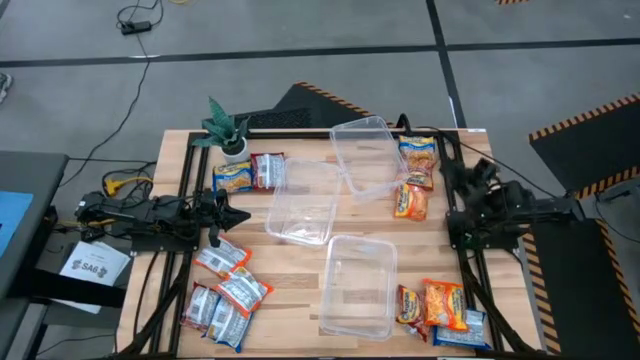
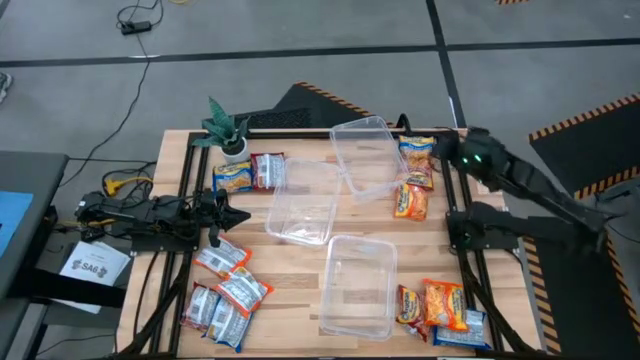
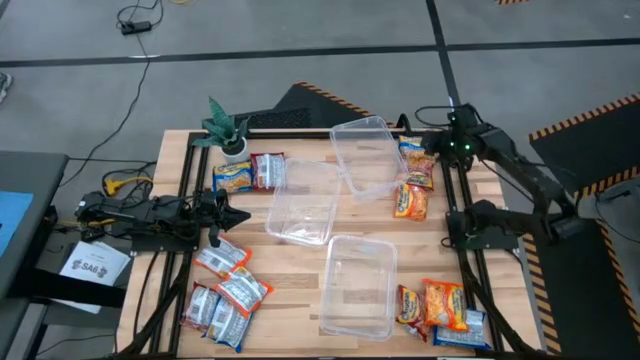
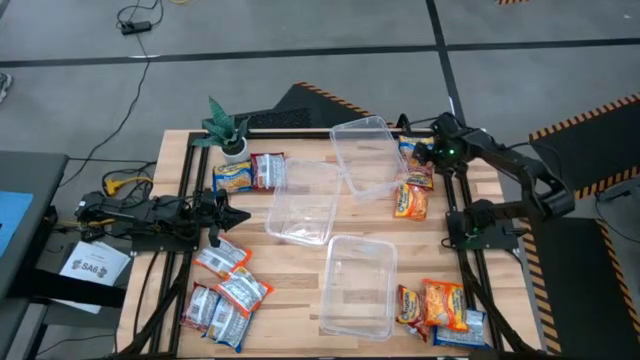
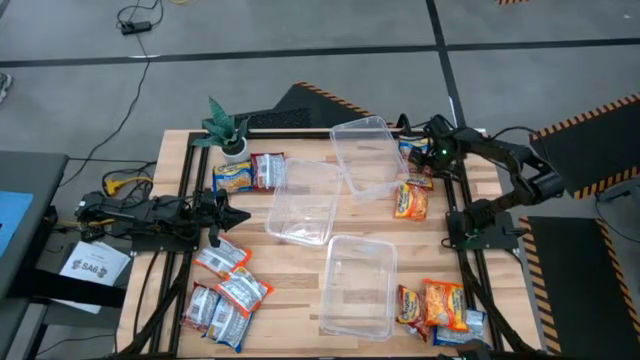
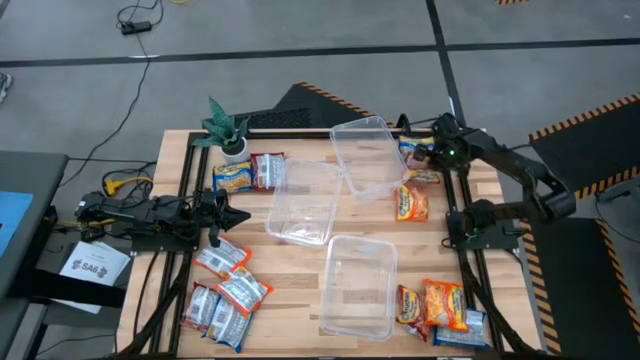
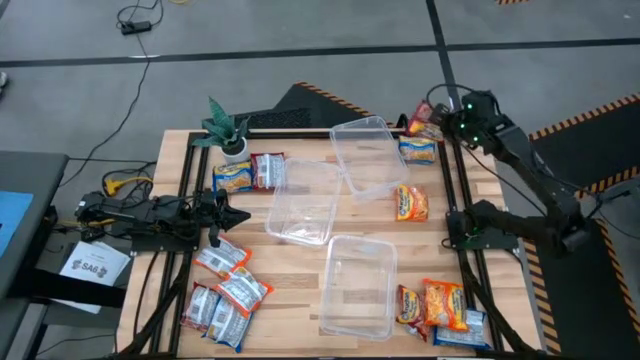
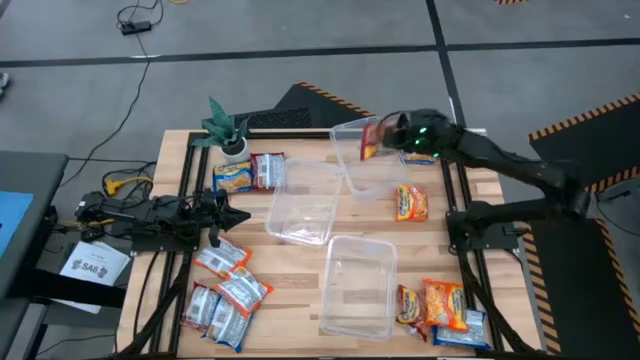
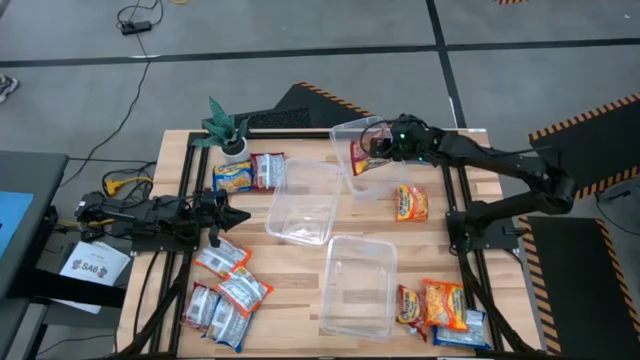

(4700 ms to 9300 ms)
Task: Sort Maruchan noodles
Put the red noodle pack into the top transparent bin

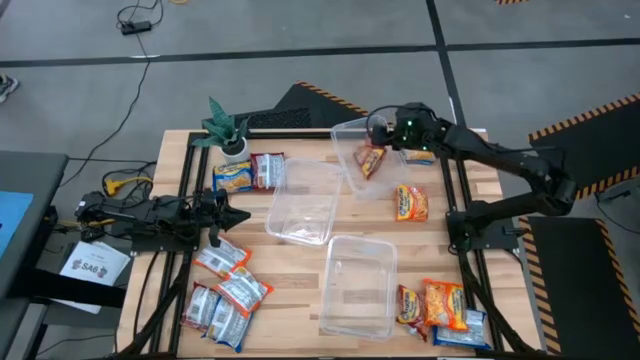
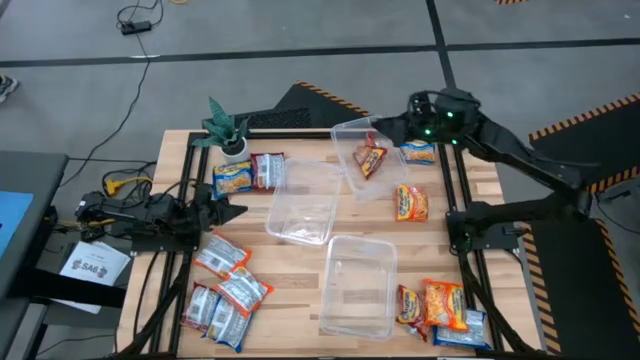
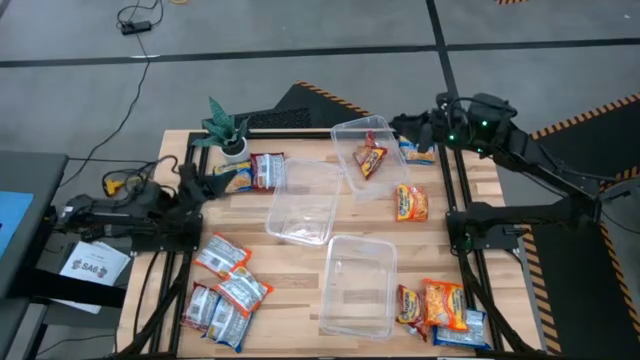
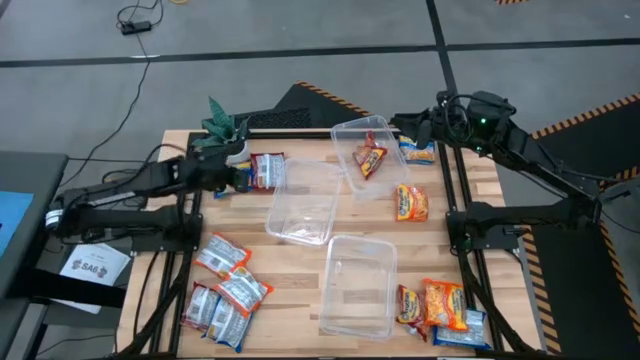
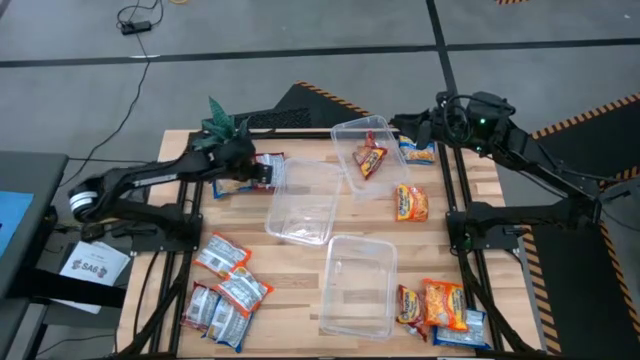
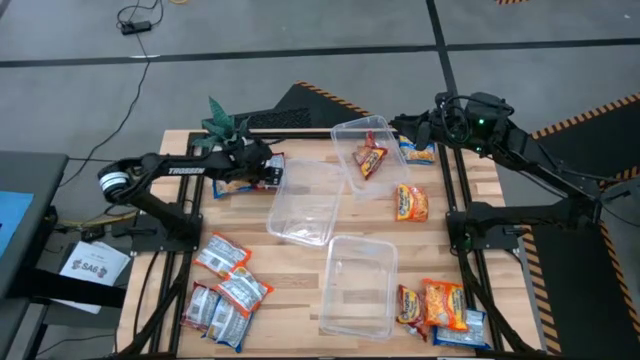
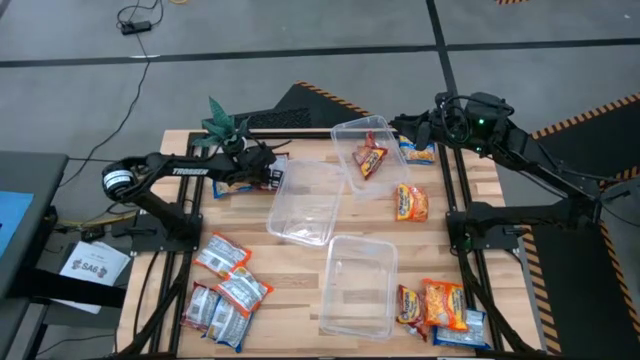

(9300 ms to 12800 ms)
Put the red noodle pack into the top transparent bin

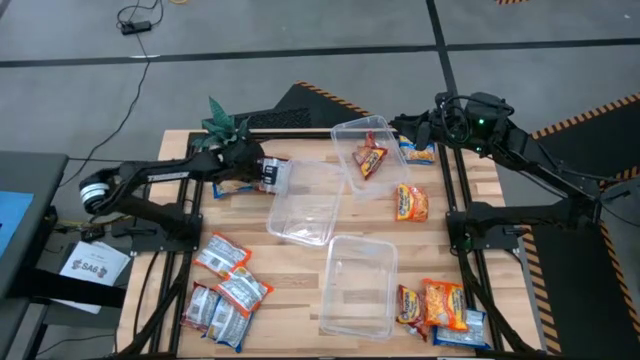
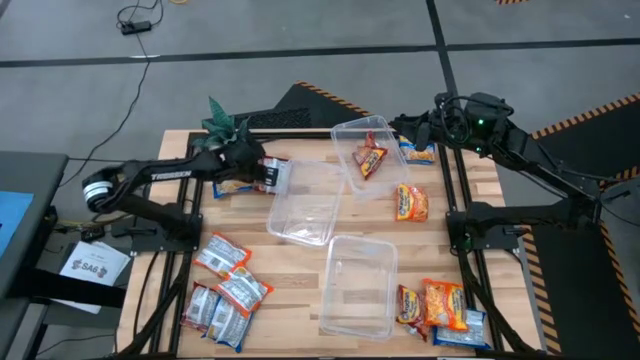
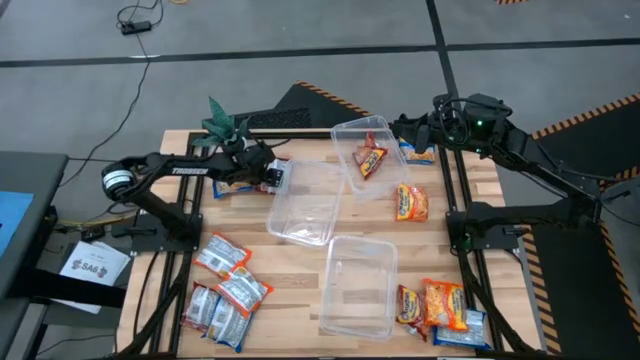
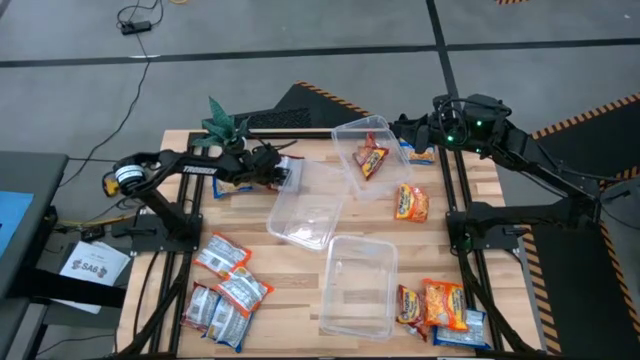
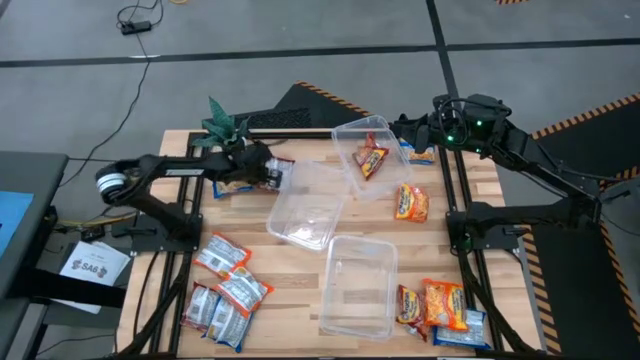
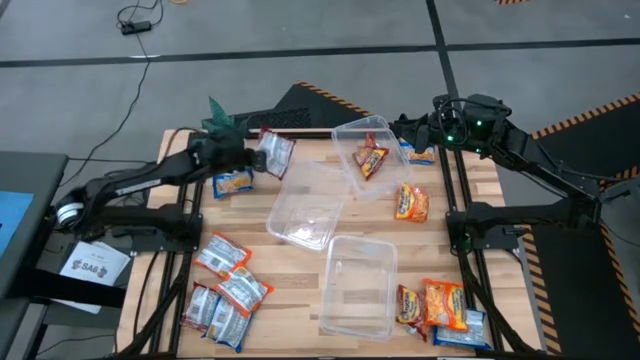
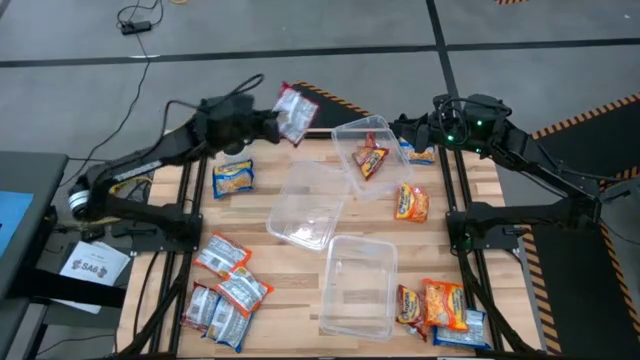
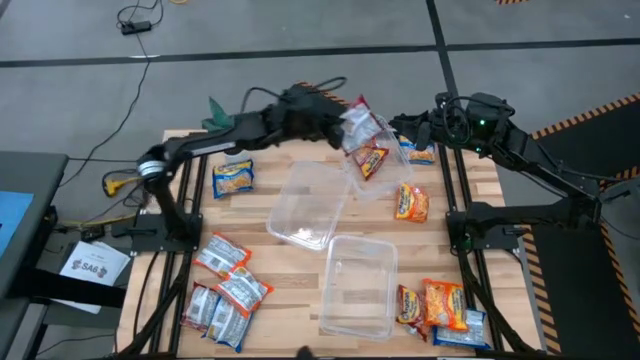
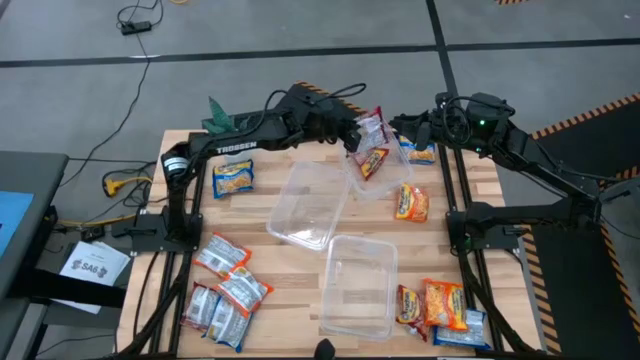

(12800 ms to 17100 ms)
Put the red noodle pack into the top transparent bin

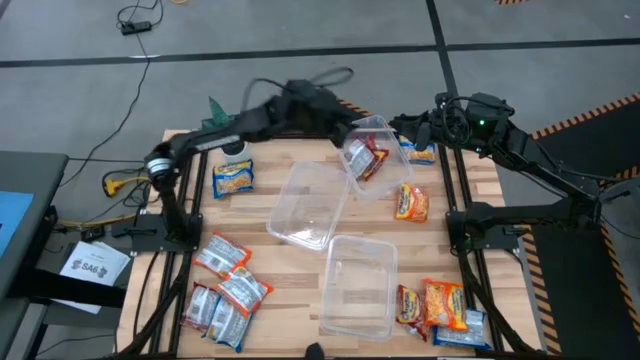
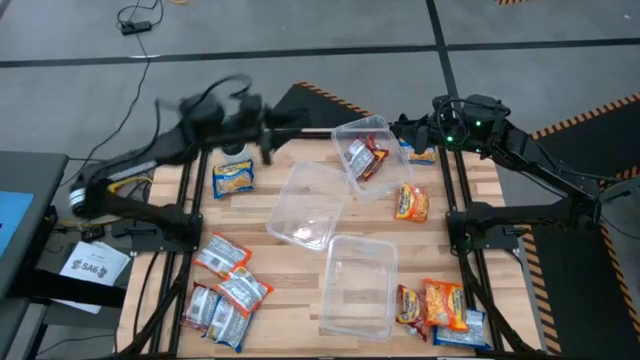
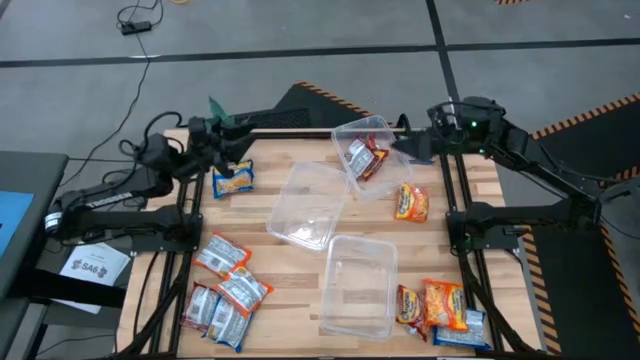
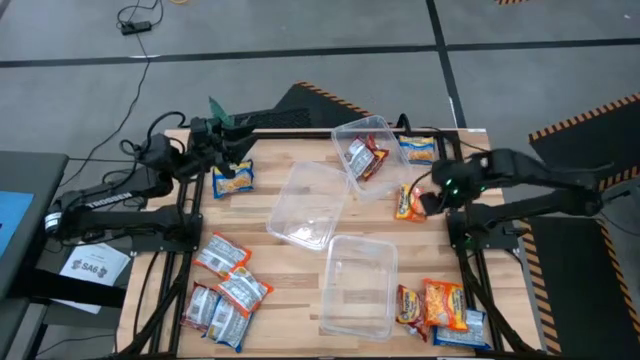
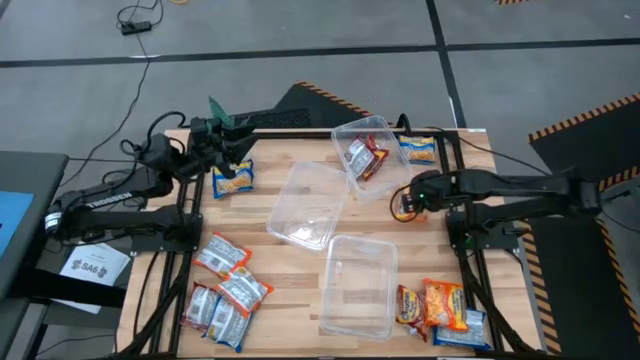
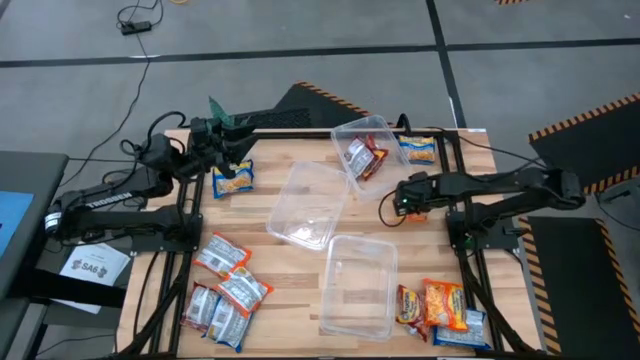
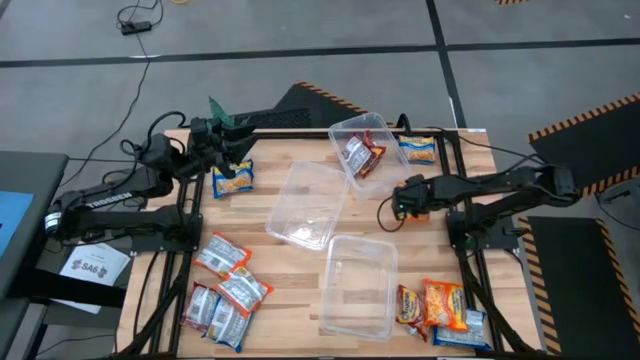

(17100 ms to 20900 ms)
Put the orange noodle pack into the middle transparent bin

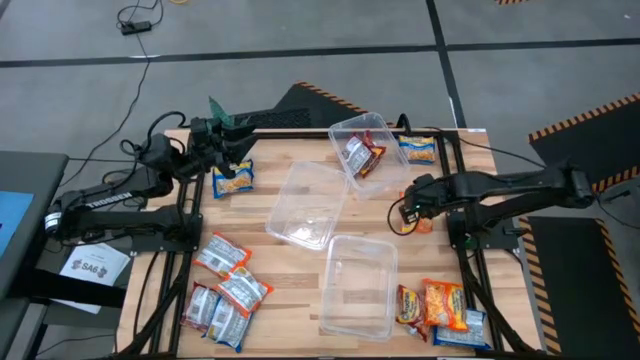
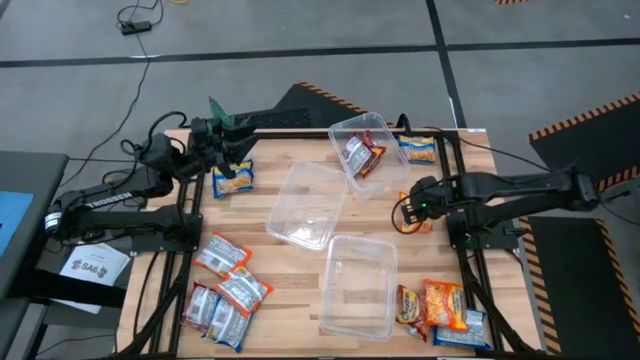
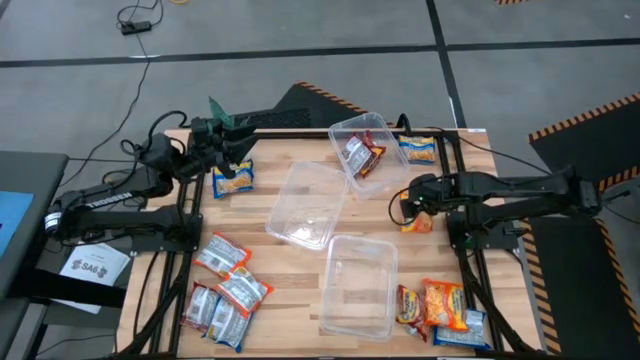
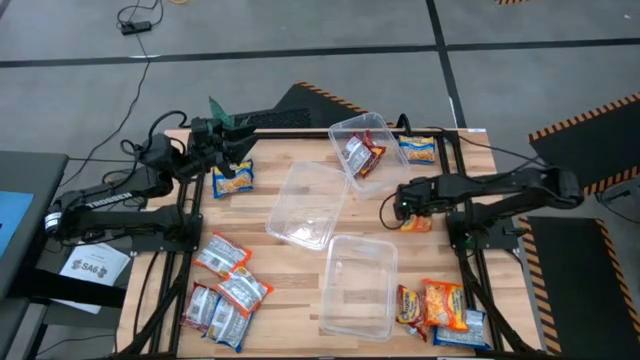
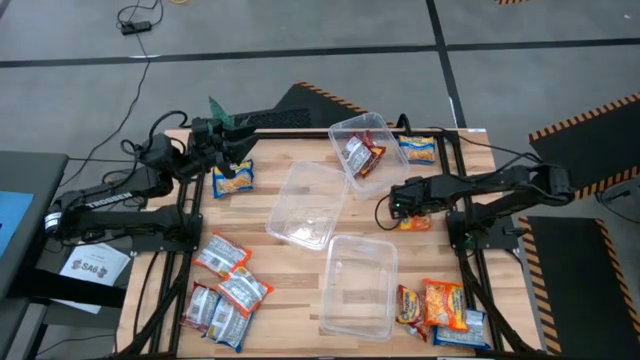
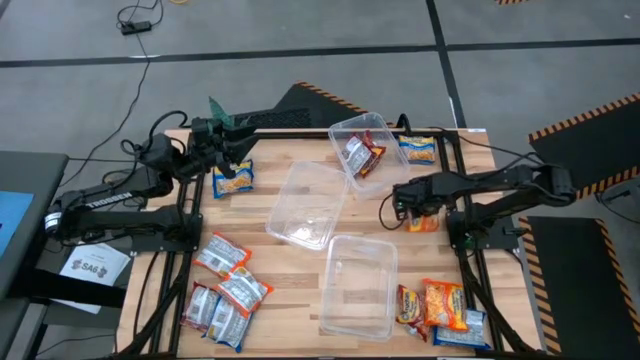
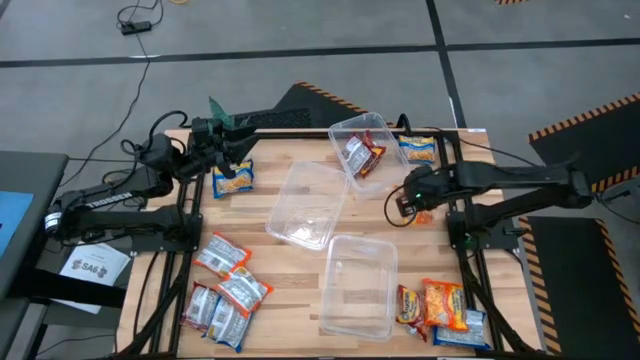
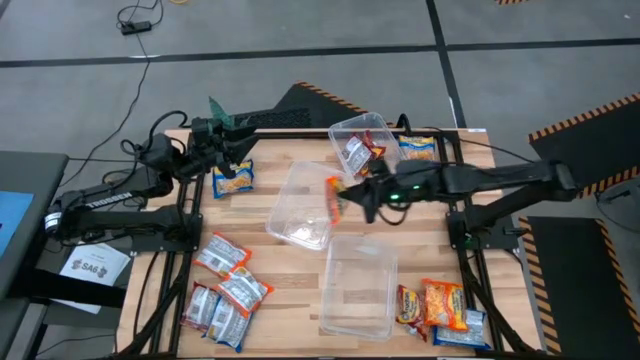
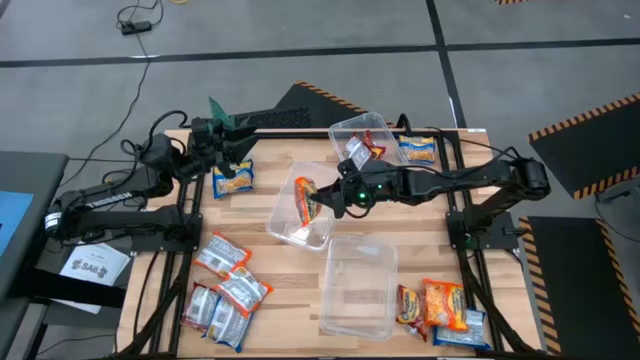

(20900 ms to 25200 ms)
Put the orange noodle pack into the middle transparent bin
